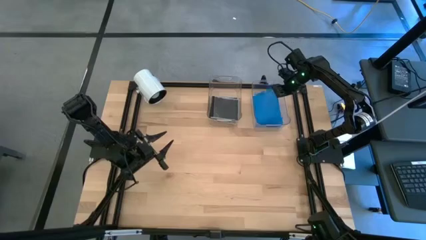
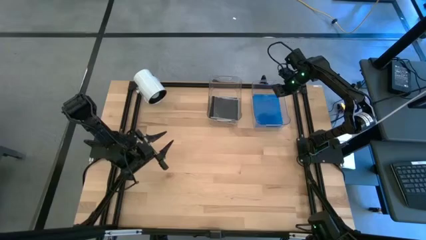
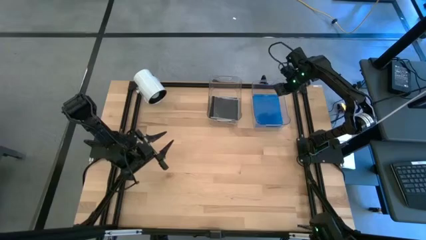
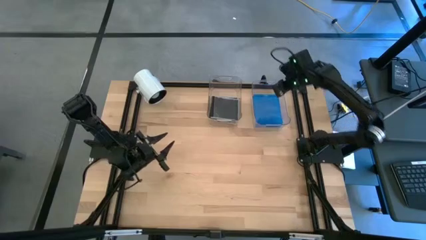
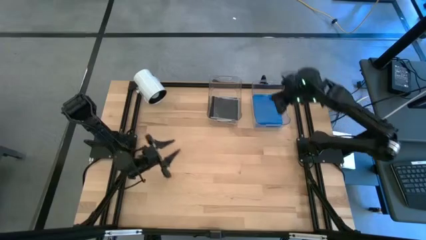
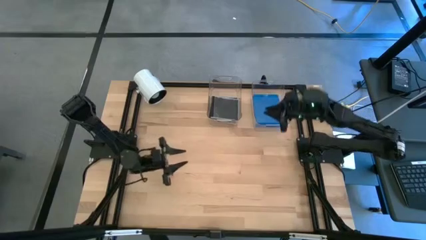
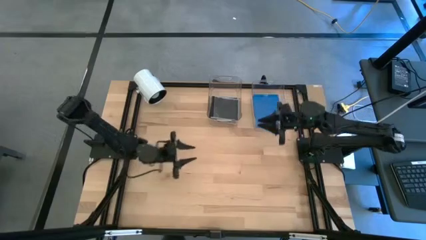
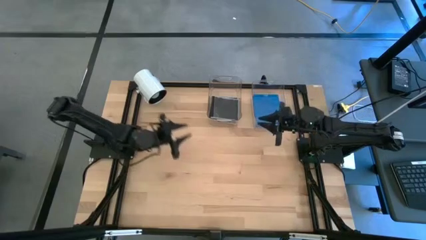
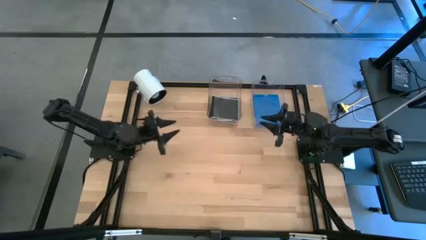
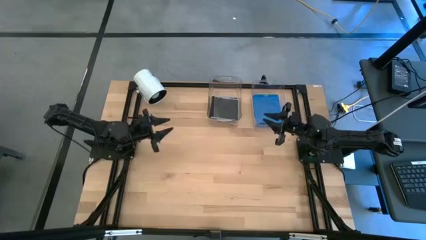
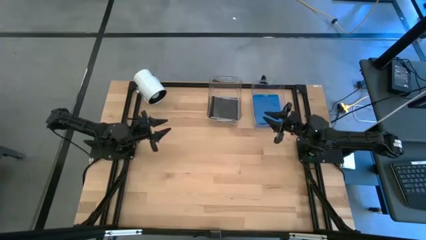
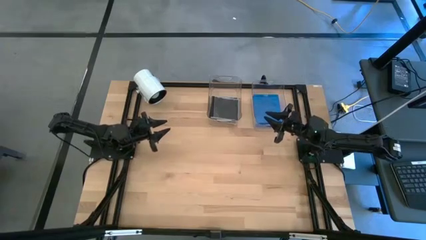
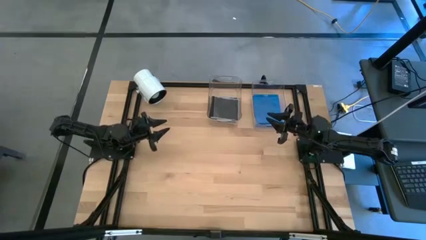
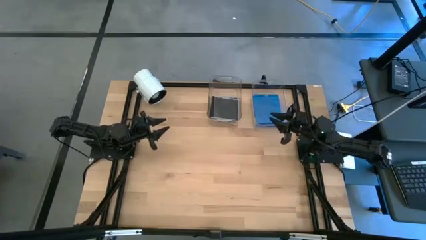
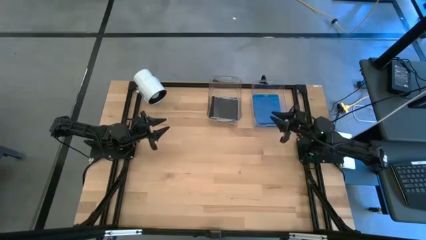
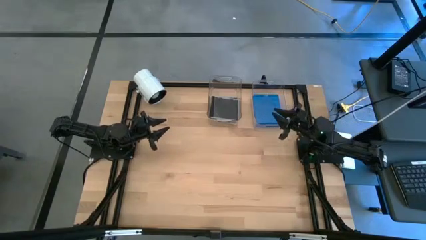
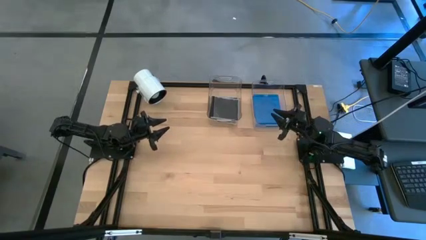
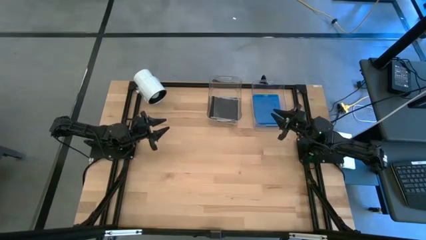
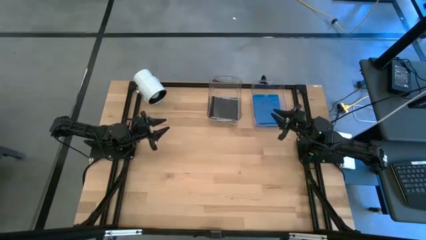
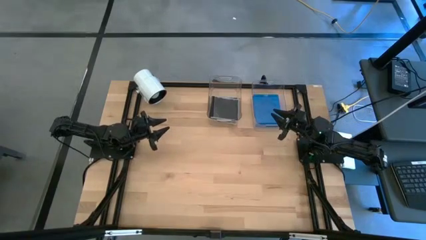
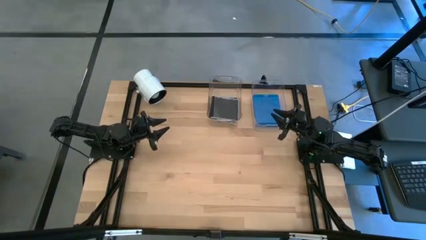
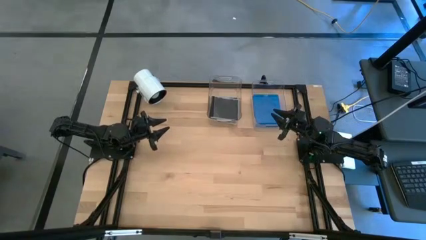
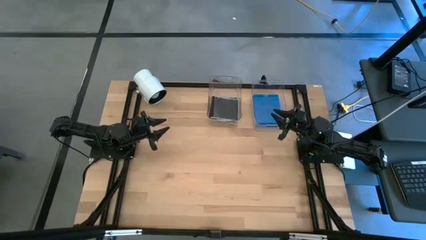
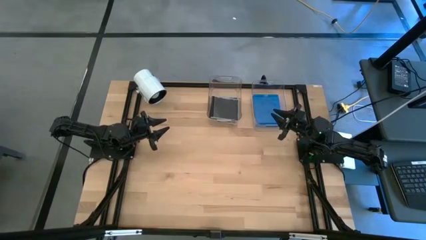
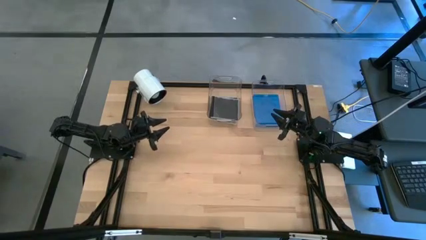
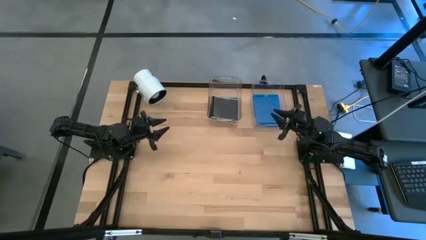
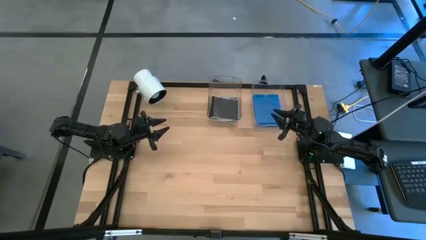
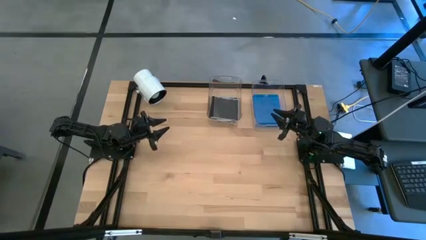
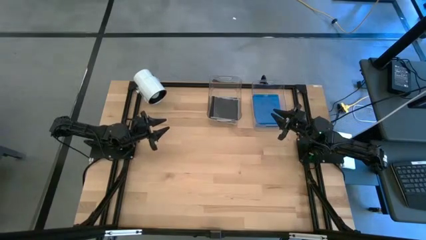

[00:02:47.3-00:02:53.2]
Task: Pick & place jewel cases by type
Return to Home Position

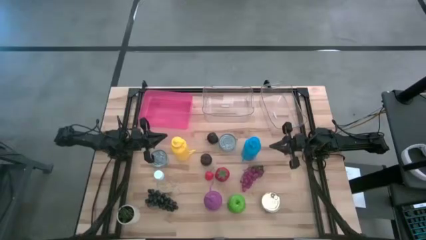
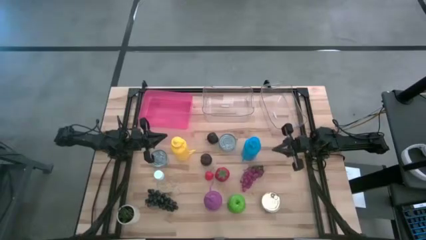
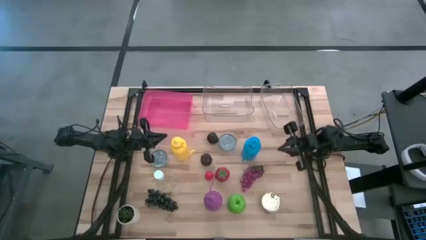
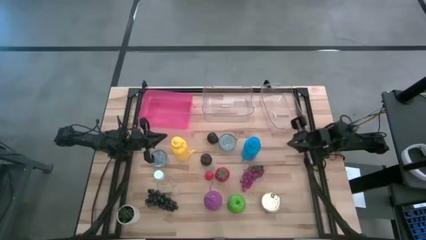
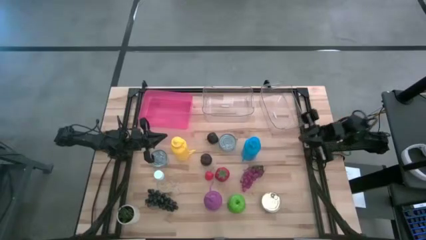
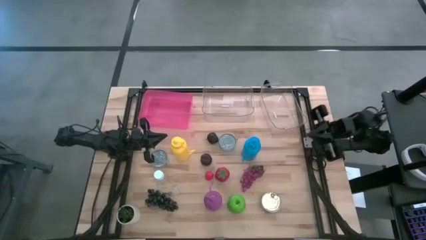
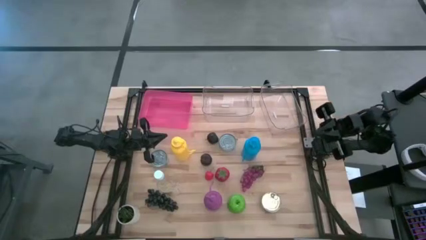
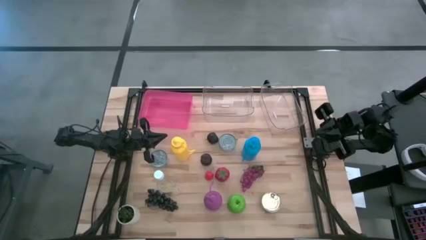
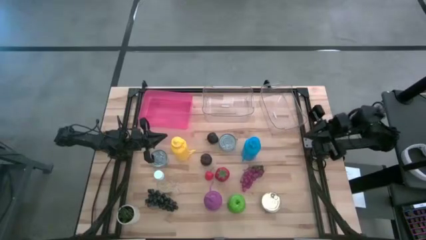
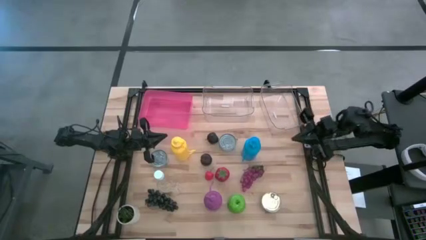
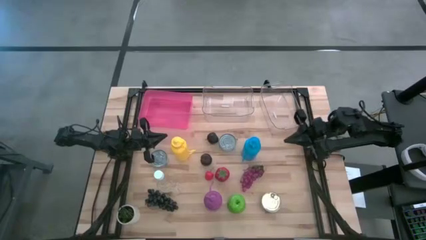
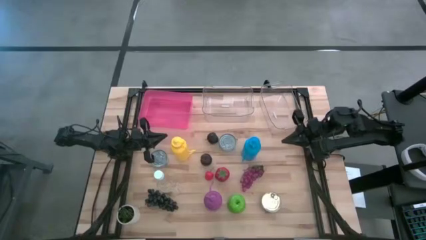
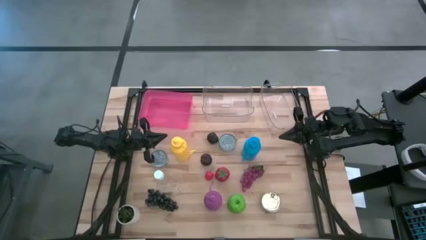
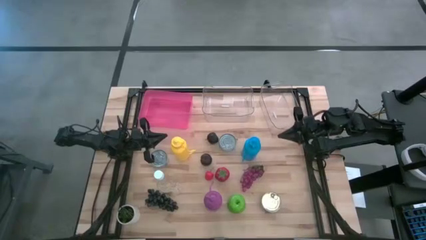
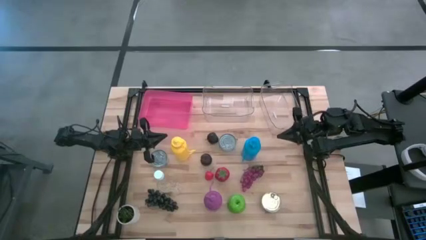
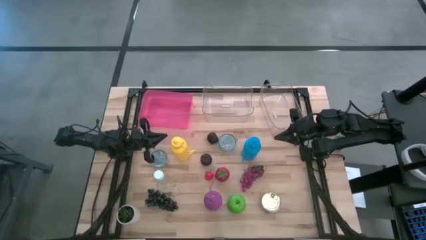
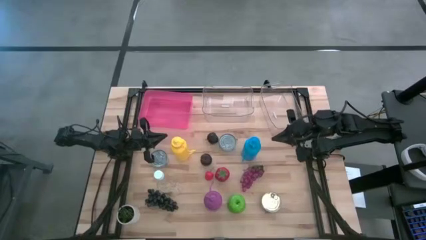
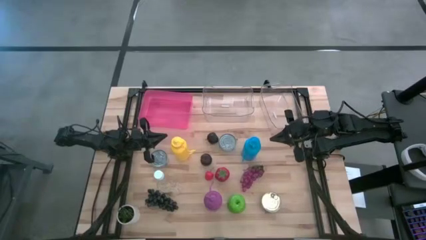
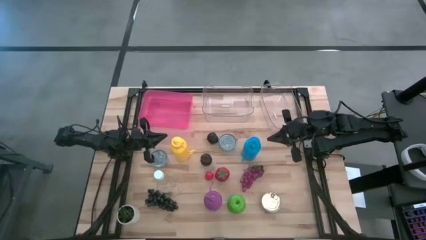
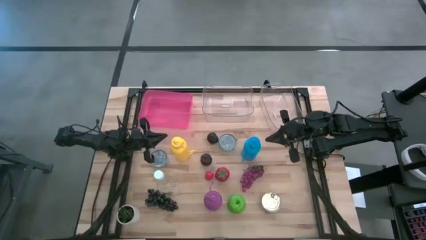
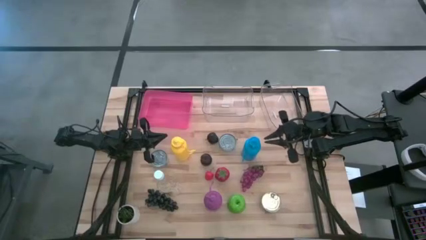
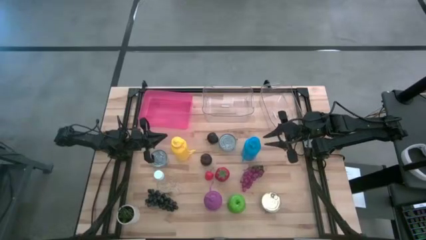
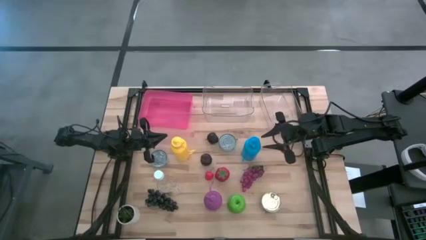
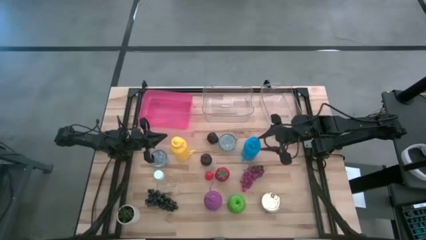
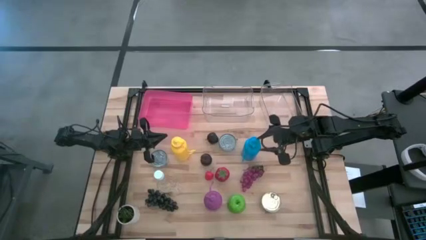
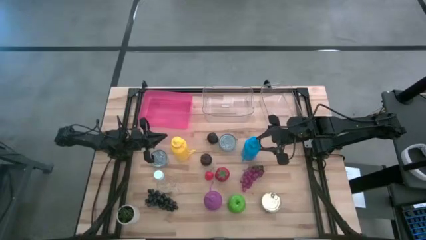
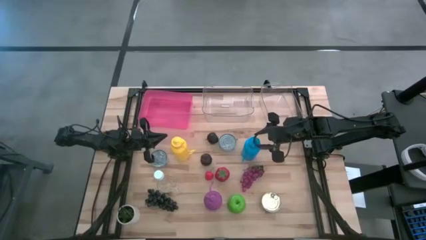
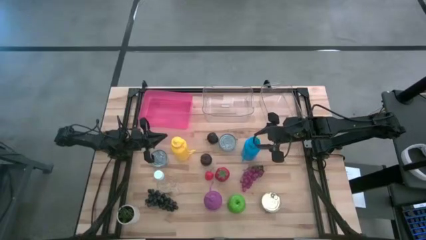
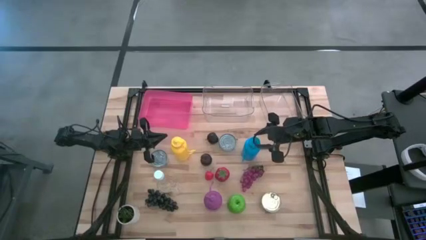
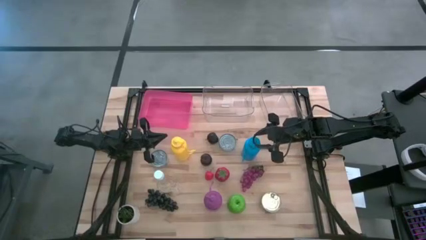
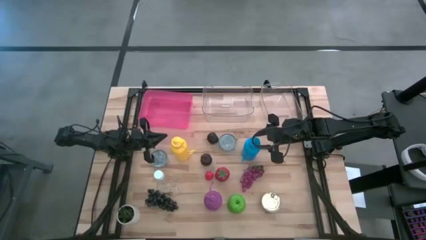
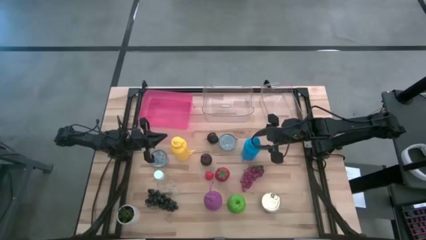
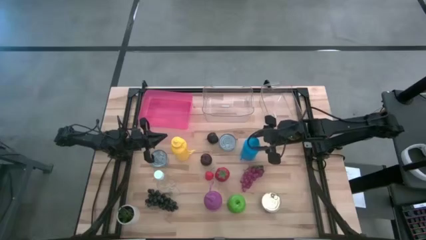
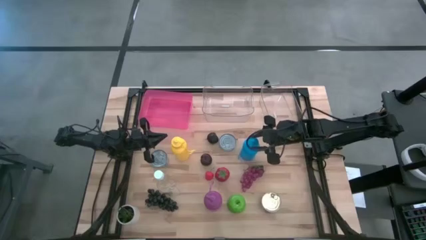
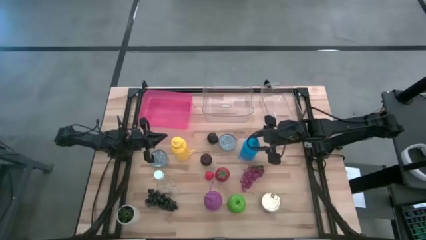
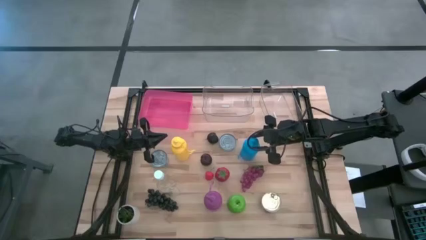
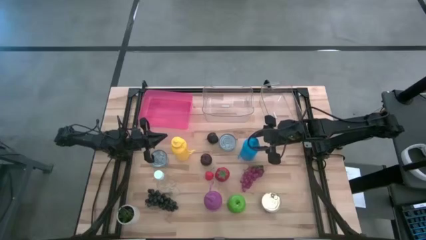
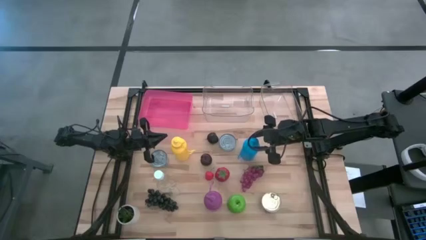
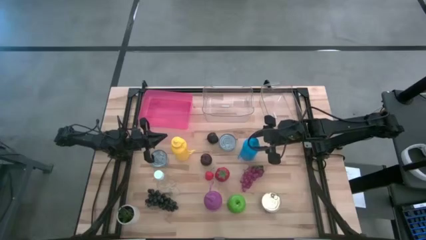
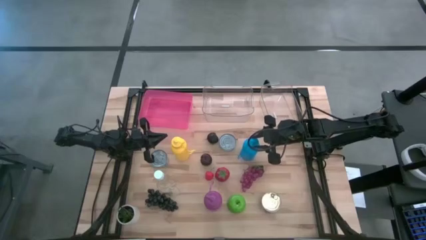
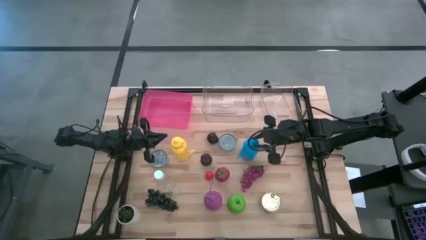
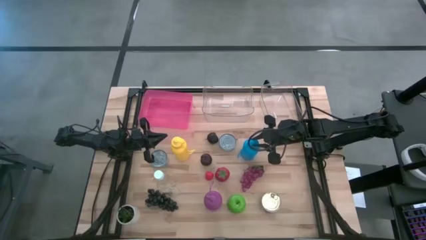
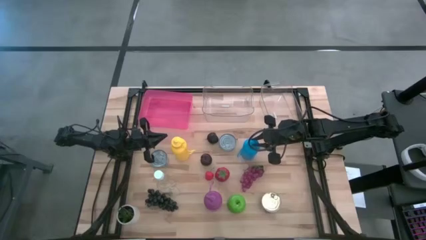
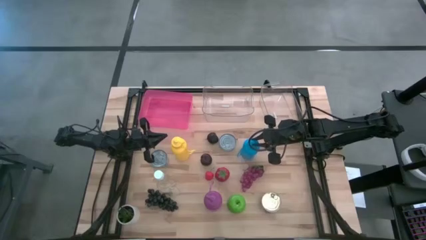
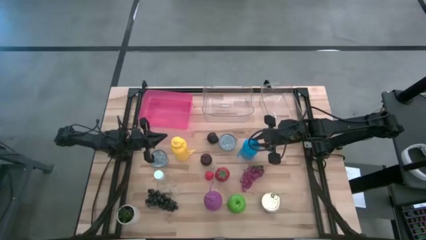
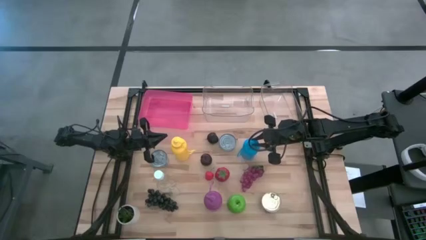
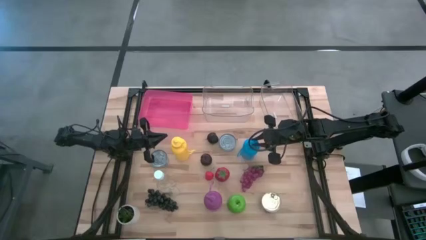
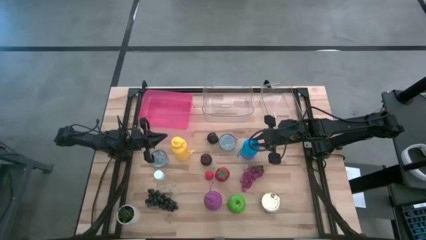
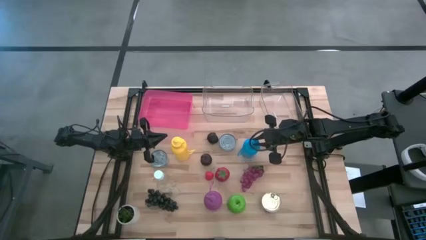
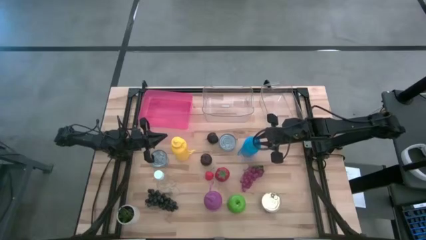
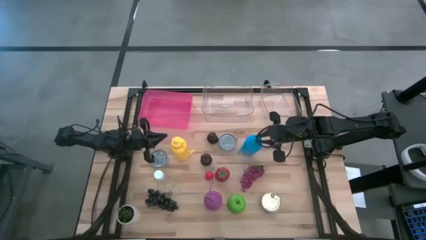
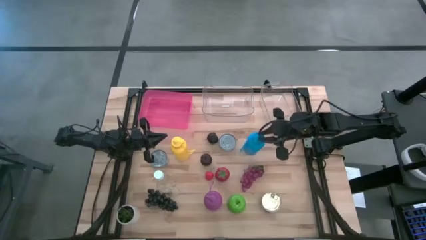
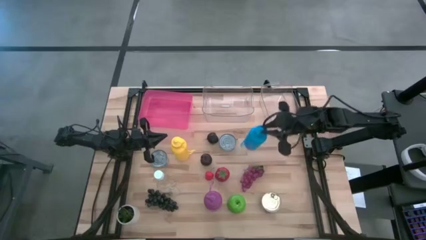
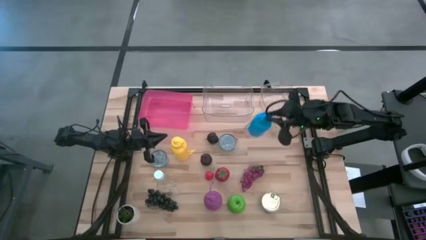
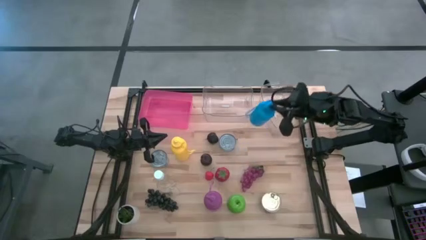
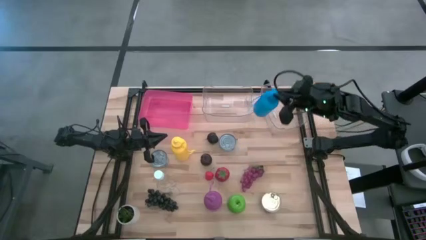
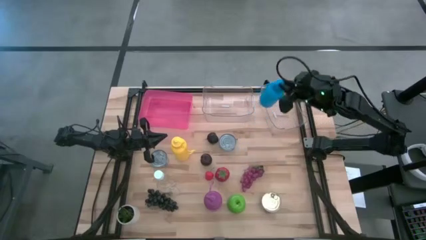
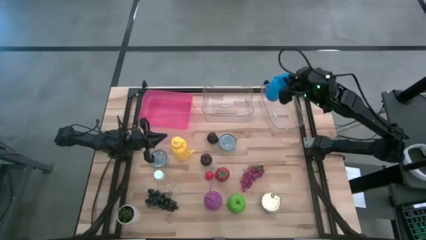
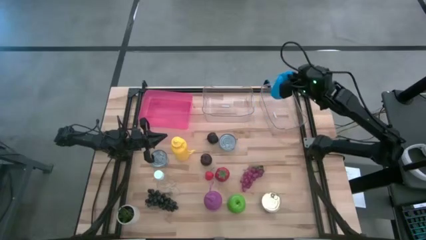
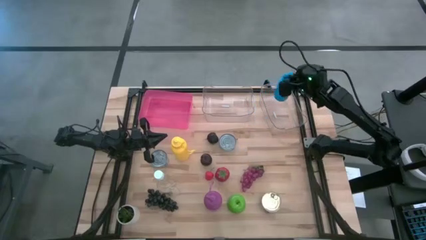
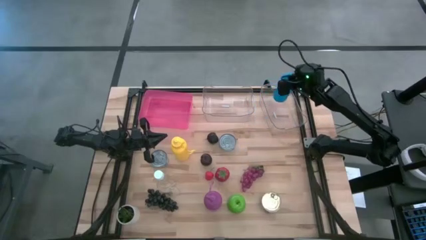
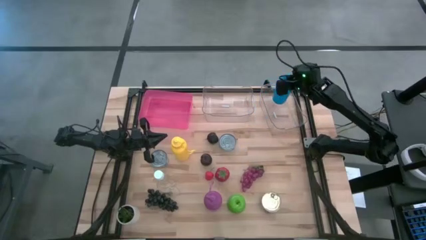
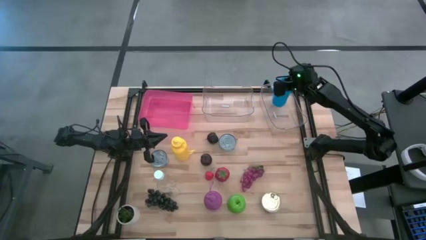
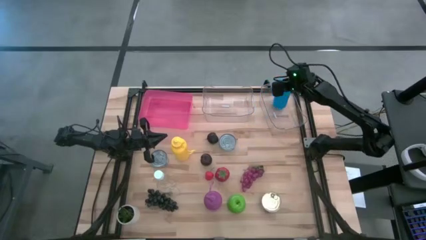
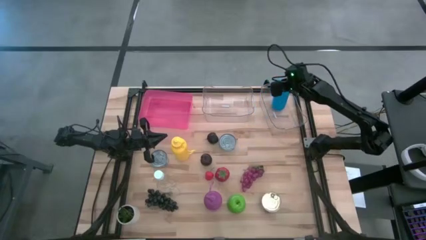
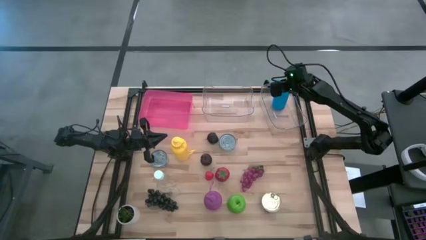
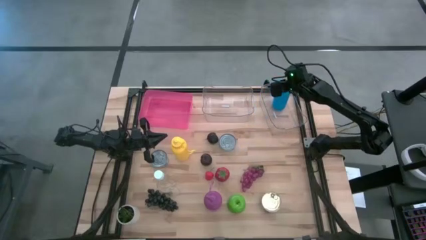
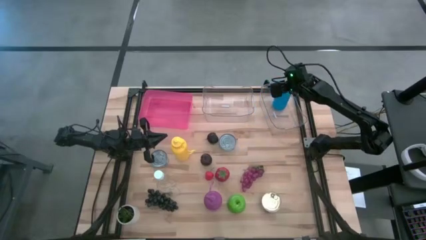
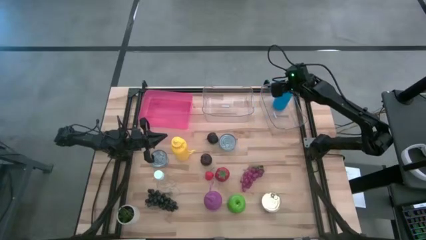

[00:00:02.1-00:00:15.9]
Task: Pick & Place Food Item
Put the blue water bottle into the right transparent bin
